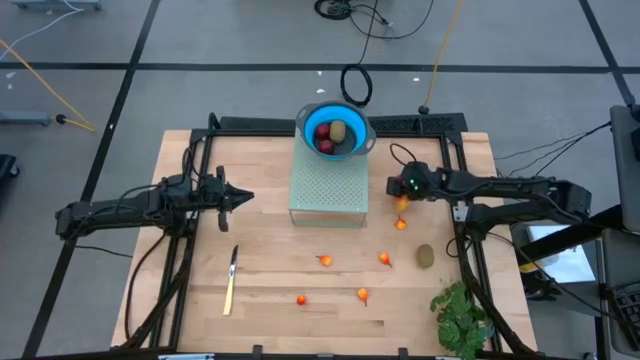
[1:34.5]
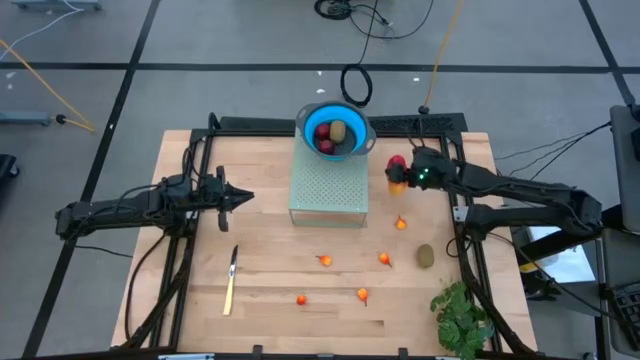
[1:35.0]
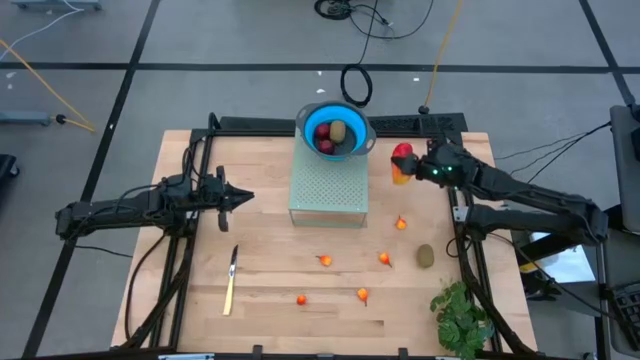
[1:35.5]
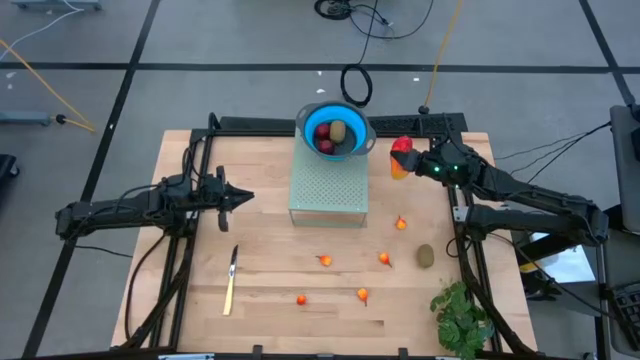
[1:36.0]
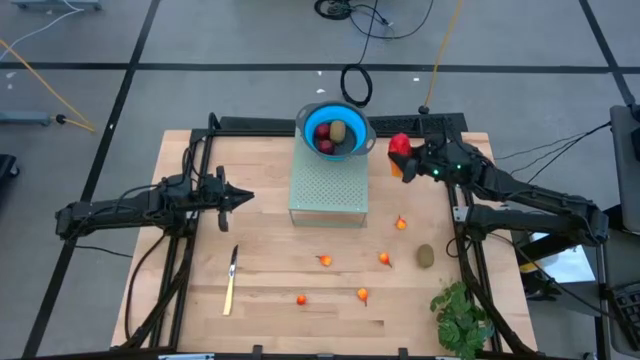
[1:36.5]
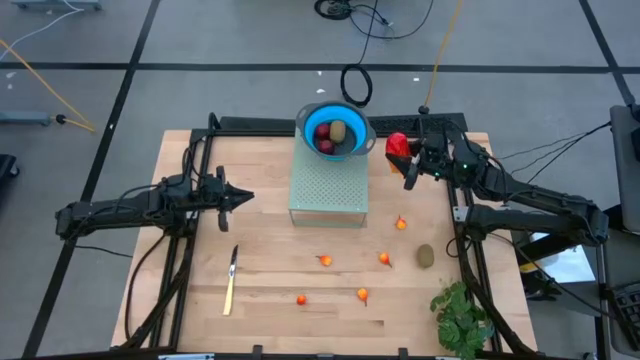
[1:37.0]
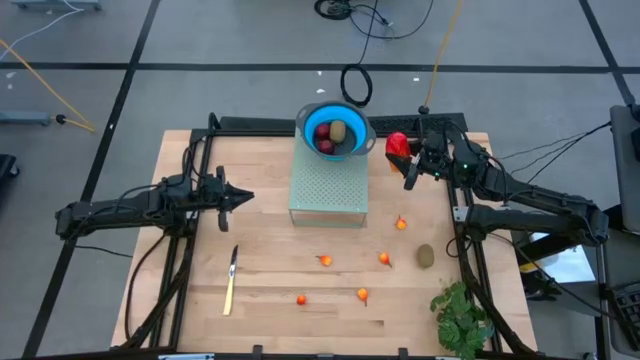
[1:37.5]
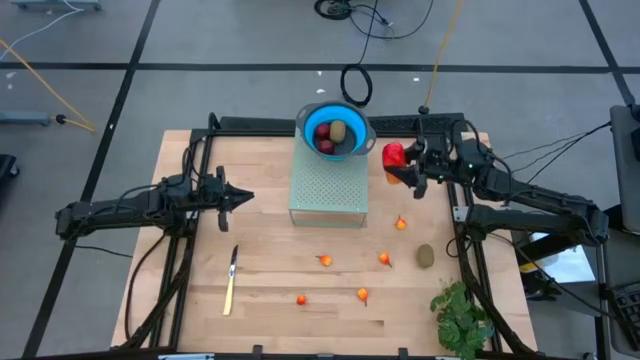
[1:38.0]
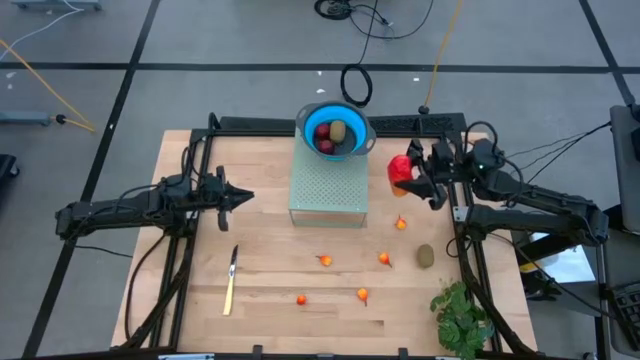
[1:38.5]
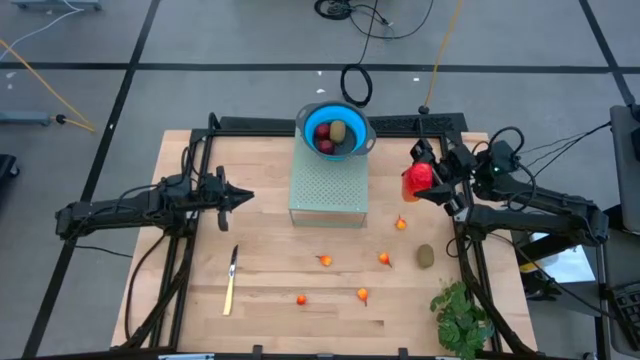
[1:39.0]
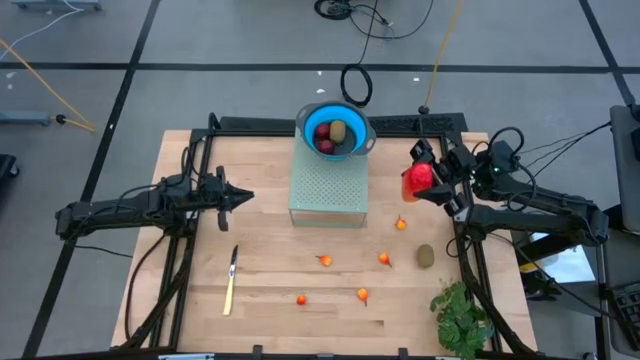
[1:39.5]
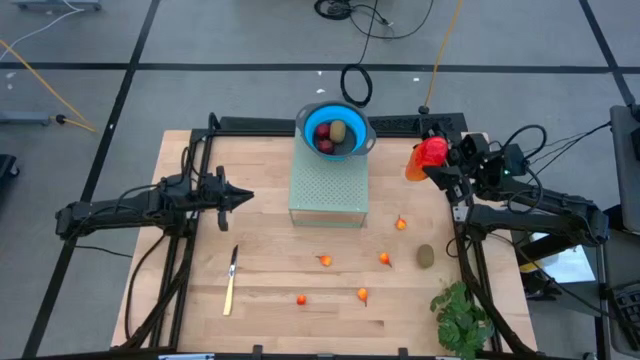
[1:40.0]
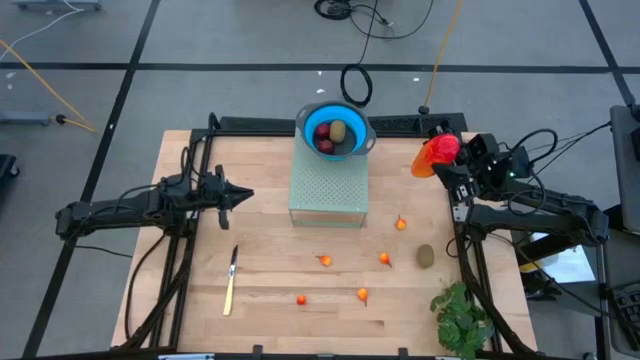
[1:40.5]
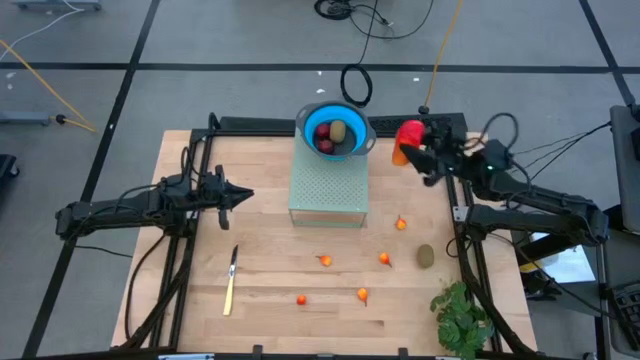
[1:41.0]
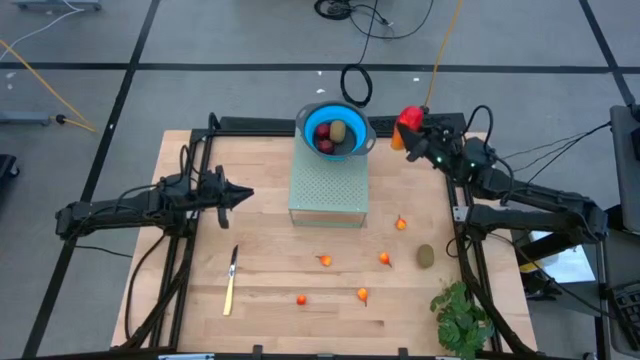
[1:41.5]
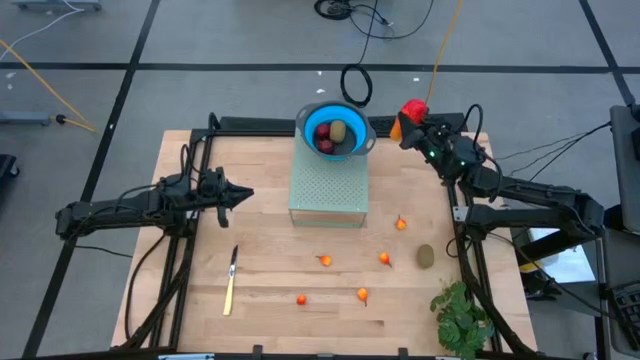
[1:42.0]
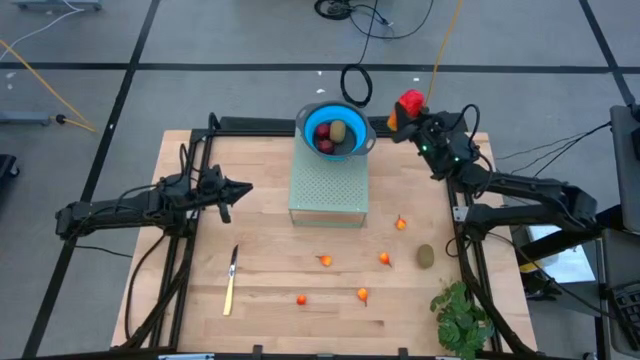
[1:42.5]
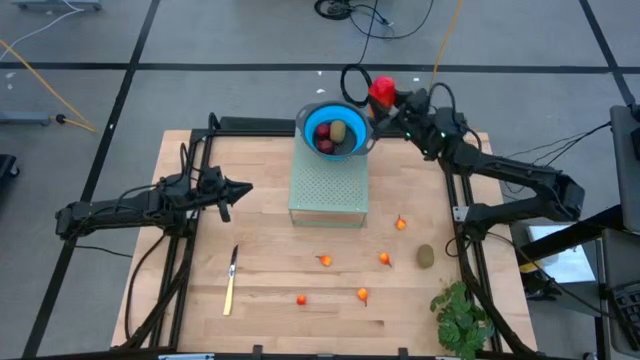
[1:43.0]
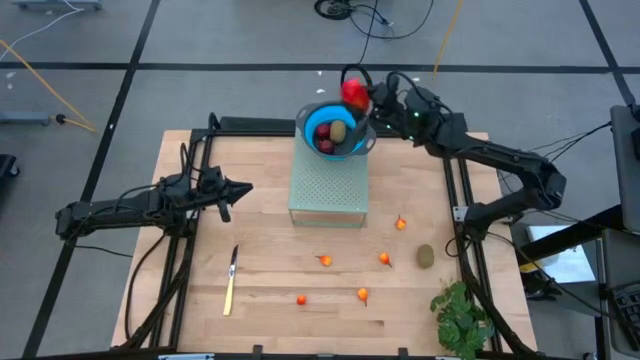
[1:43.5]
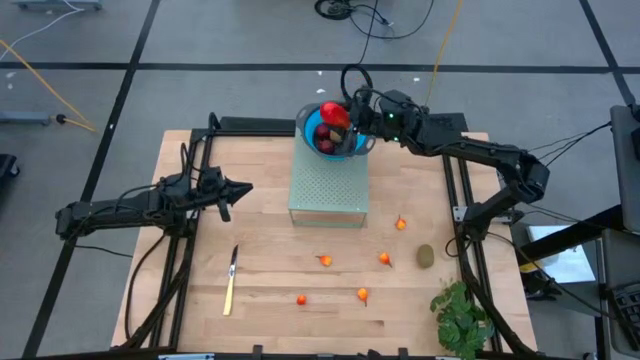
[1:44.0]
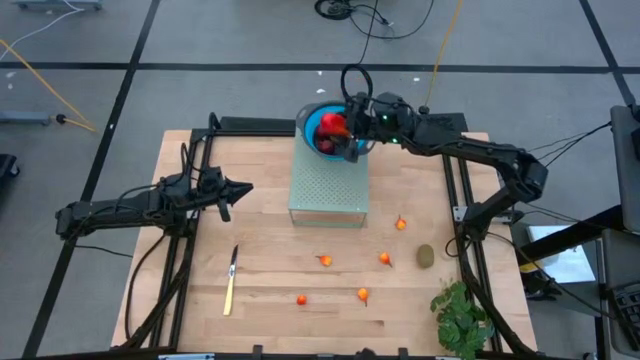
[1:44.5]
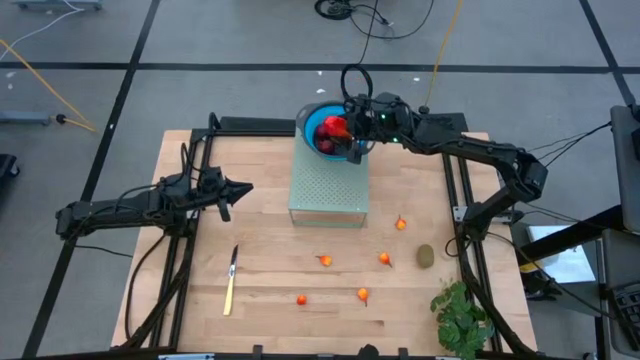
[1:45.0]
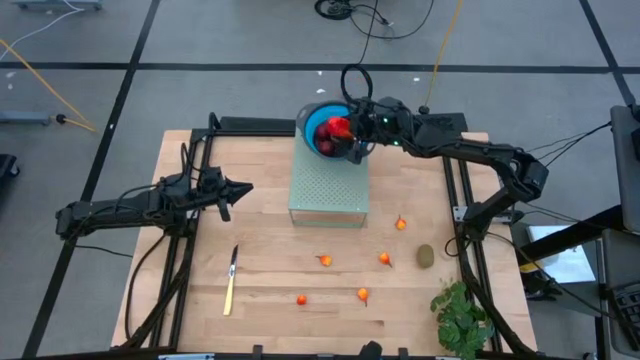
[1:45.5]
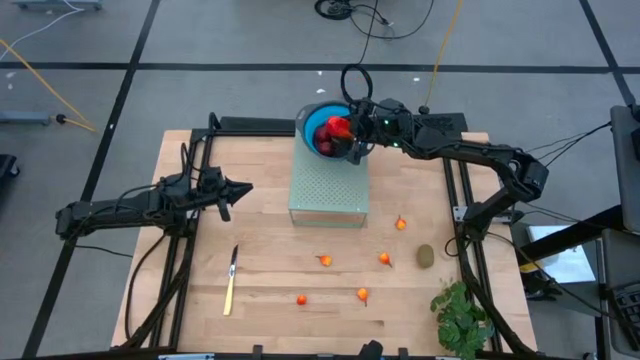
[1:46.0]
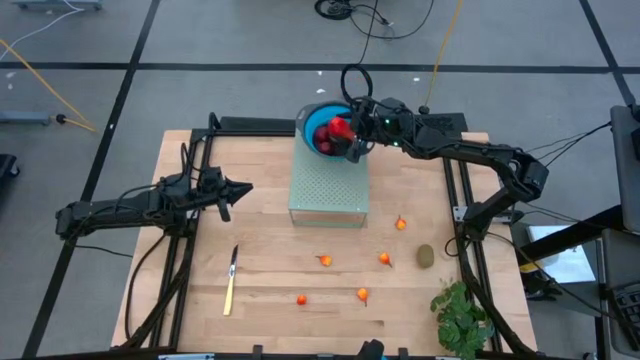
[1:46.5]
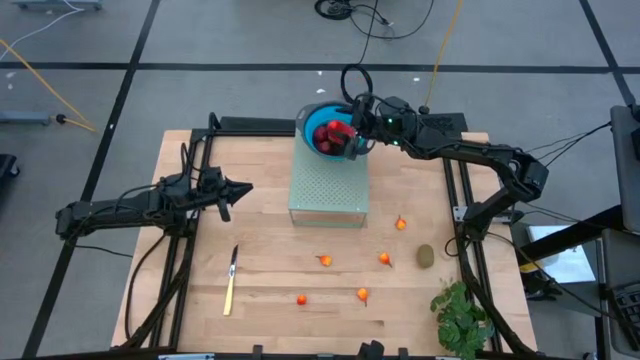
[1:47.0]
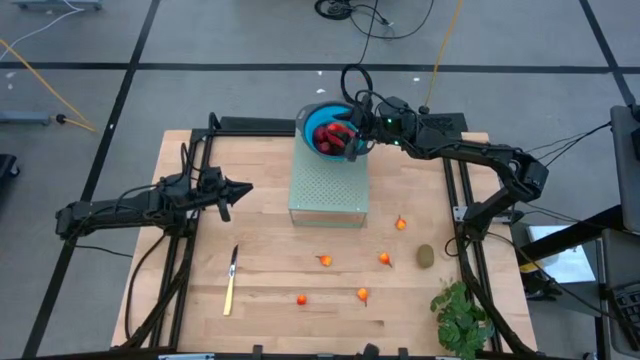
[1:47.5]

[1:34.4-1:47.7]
Task: Pick & Place Fruit
Put the mango into the blue strainer bowl on the shelf

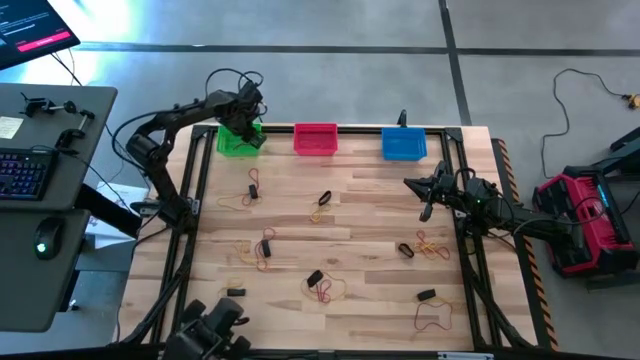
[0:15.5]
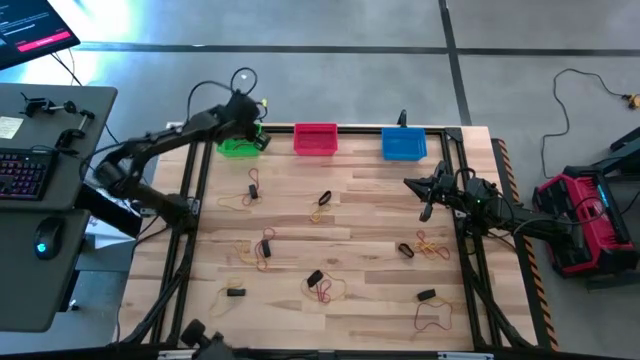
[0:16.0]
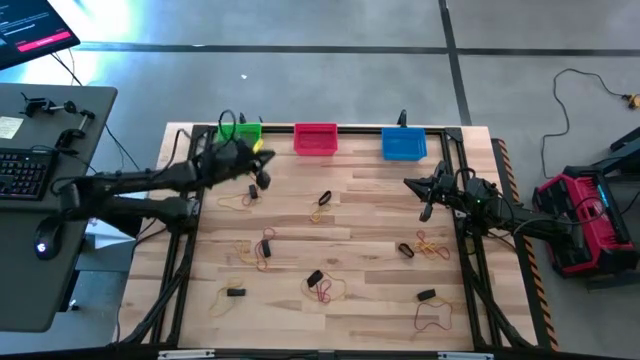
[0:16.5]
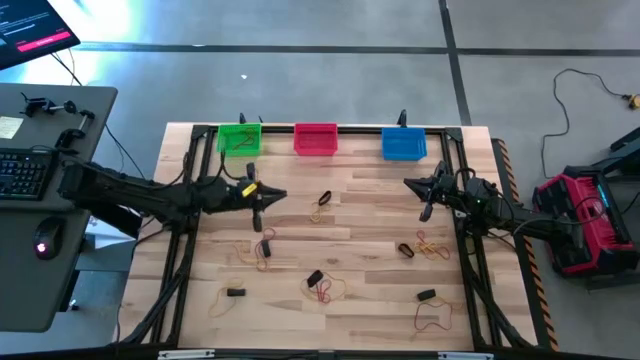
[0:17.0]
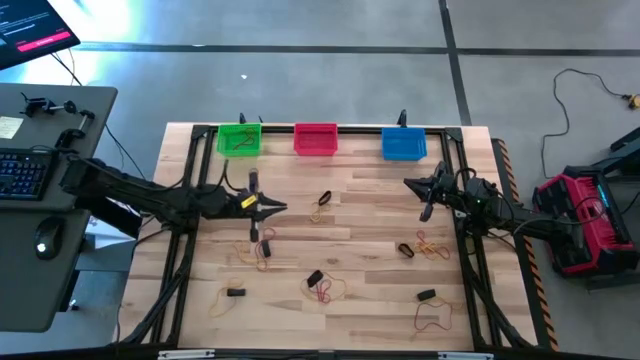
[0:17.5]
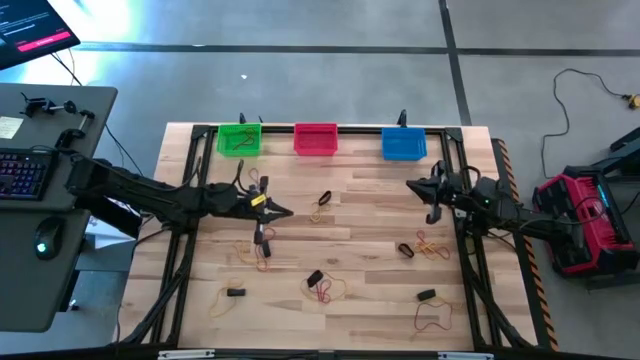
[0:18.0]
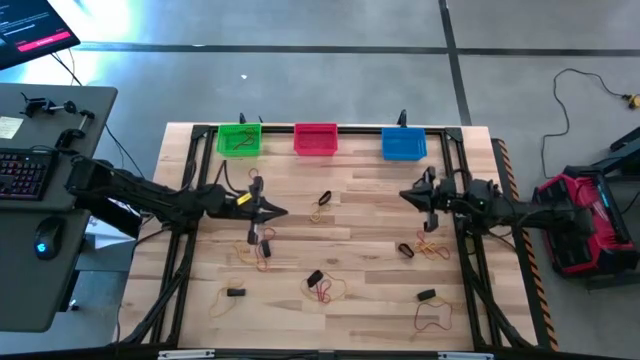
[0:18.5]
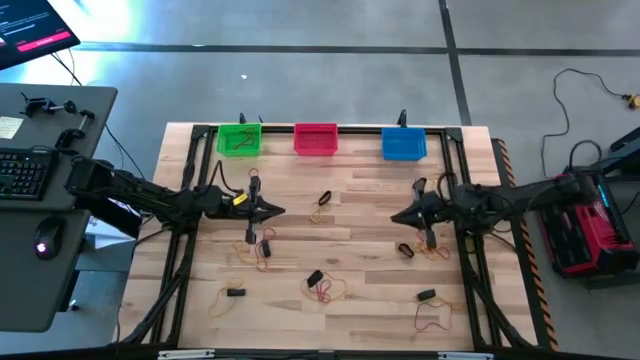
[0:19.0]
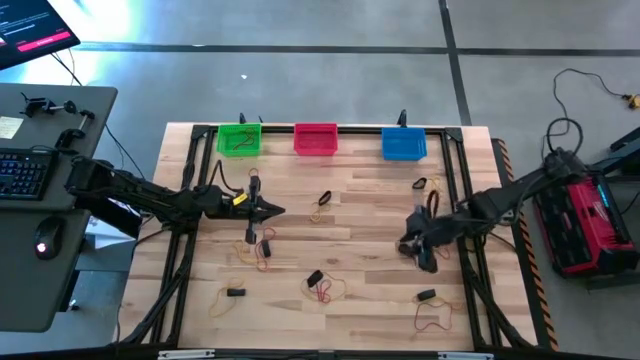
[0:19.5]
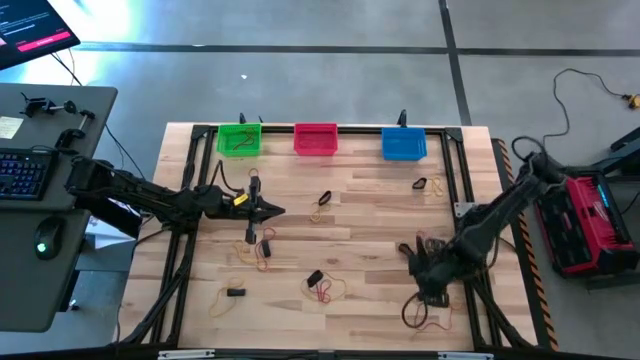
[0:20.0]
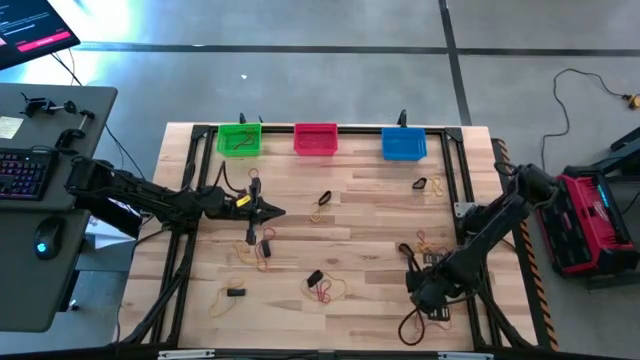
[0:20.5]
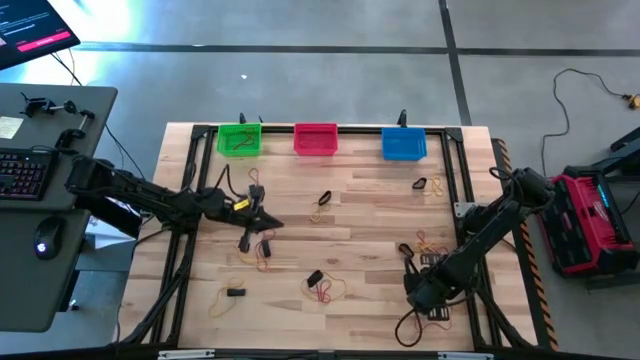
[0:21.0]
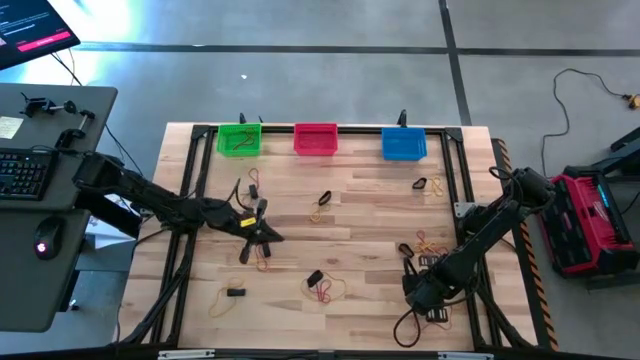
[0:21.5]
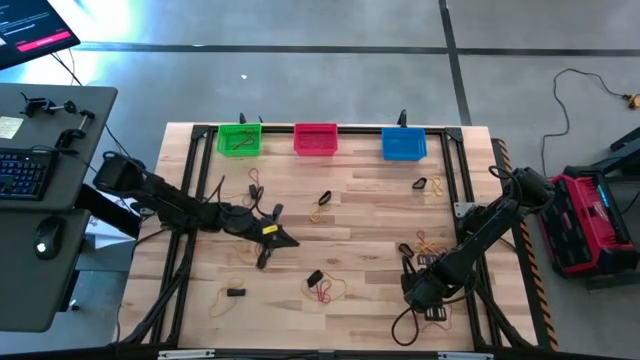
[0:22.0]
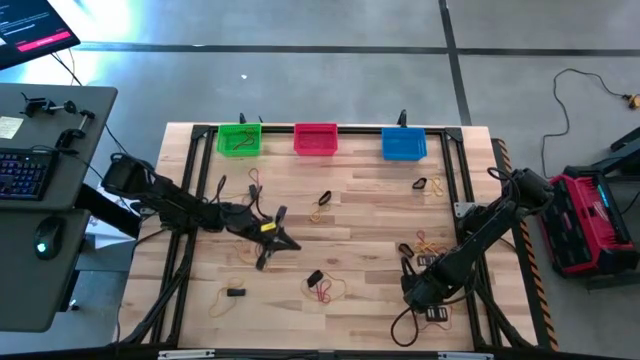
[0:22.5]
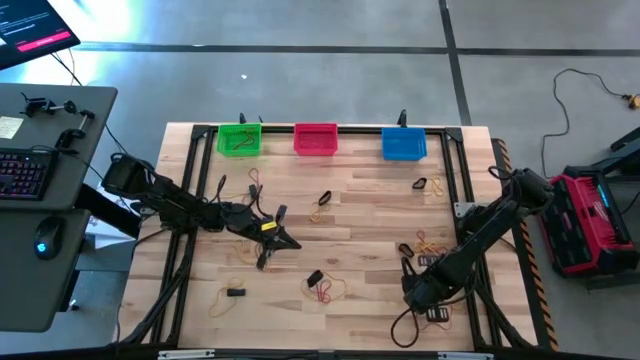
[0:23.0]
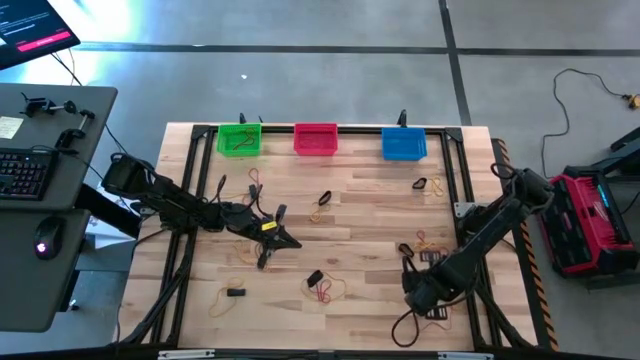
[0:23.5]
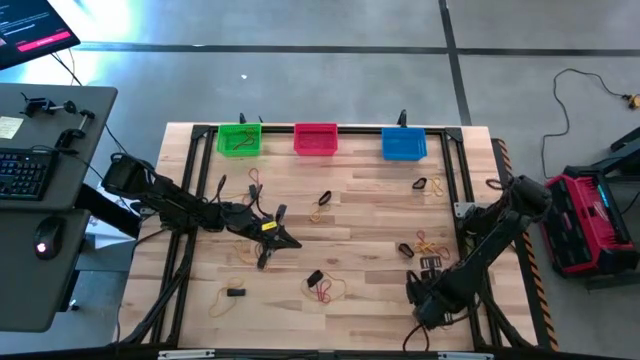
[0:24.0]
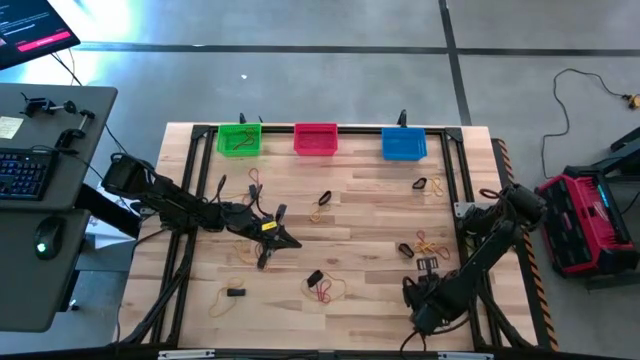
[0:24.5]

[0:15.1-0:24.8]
Task: Sort rubber bands into baskets
Put the black rubber band into the red bin
